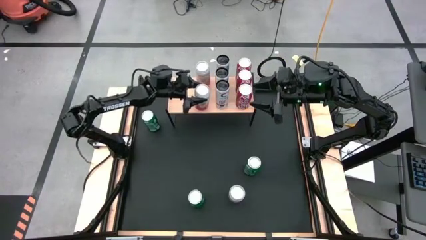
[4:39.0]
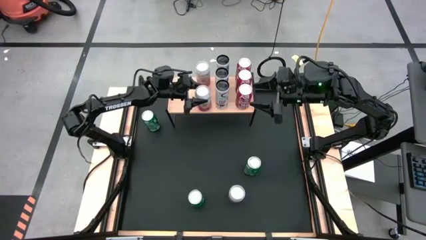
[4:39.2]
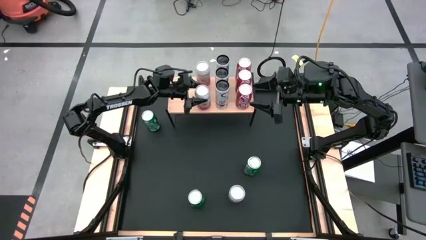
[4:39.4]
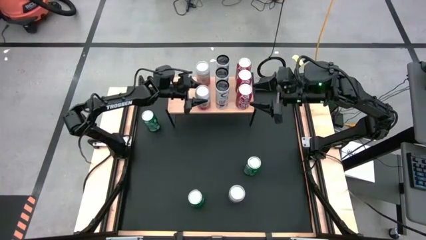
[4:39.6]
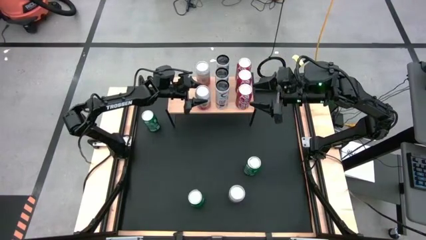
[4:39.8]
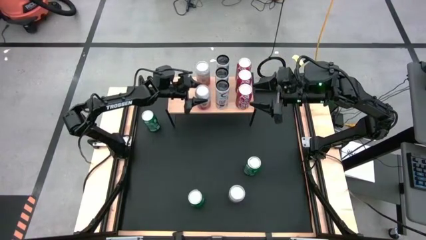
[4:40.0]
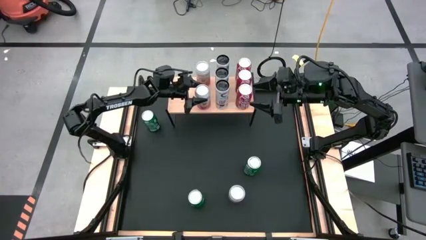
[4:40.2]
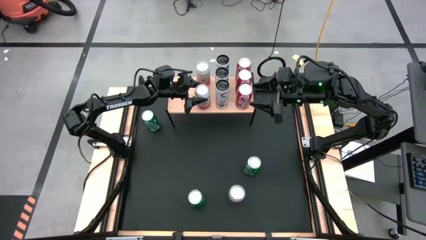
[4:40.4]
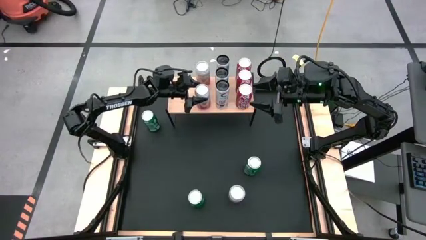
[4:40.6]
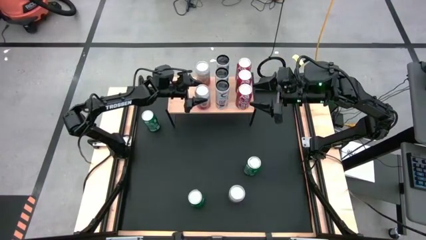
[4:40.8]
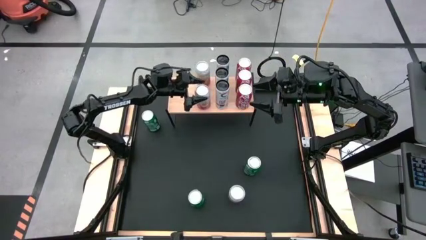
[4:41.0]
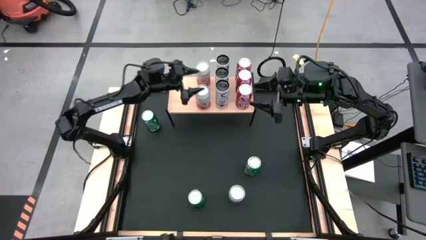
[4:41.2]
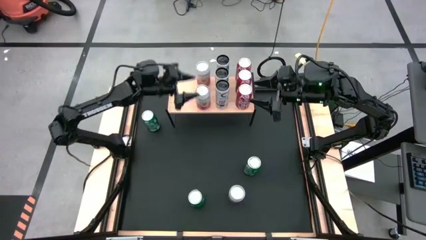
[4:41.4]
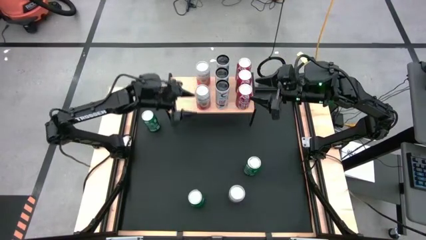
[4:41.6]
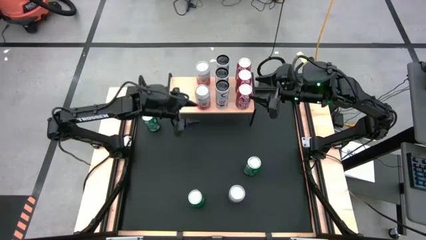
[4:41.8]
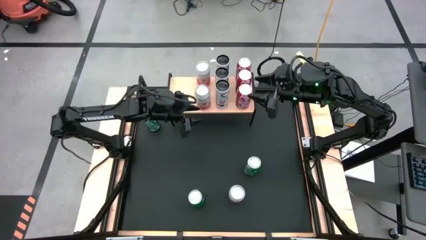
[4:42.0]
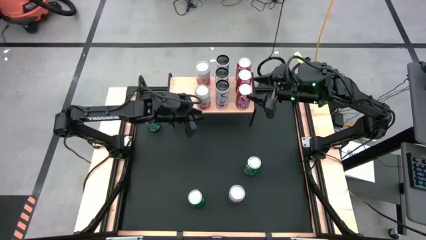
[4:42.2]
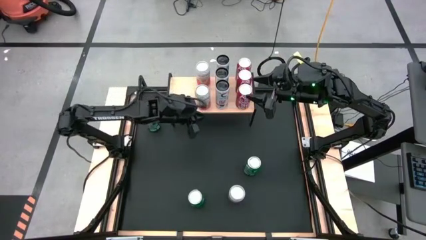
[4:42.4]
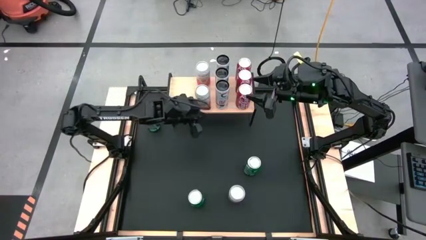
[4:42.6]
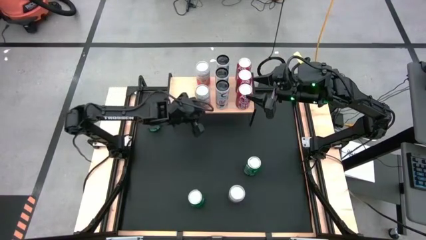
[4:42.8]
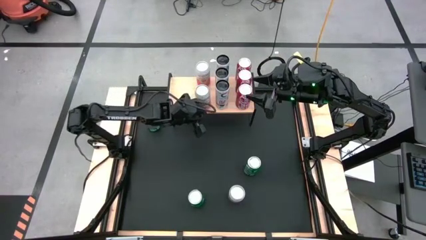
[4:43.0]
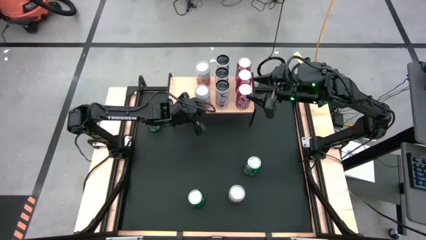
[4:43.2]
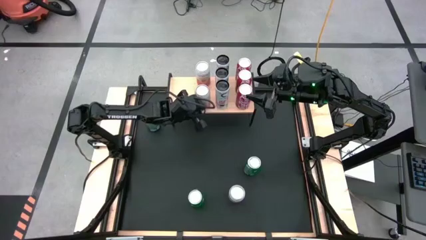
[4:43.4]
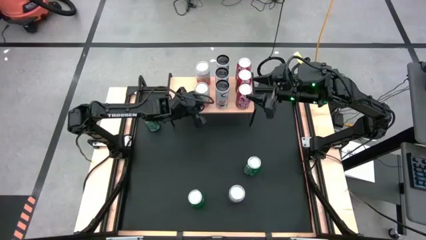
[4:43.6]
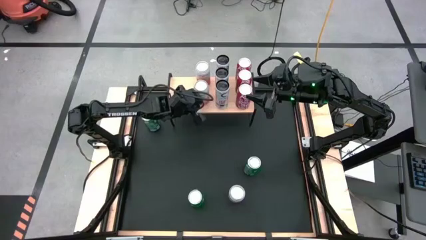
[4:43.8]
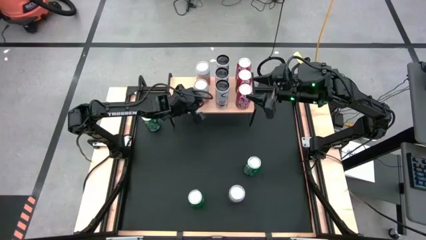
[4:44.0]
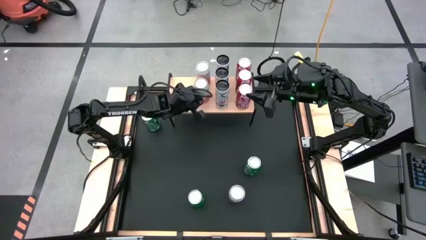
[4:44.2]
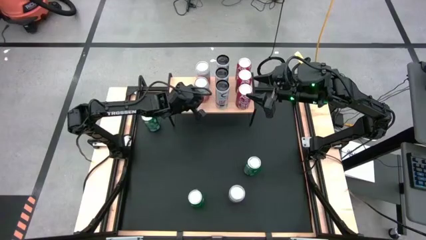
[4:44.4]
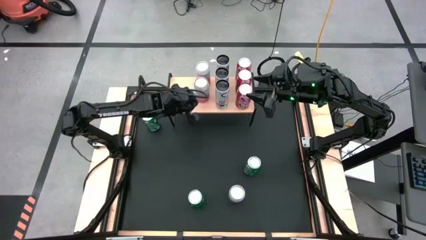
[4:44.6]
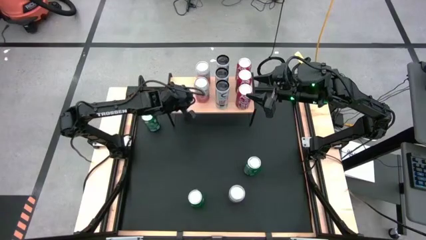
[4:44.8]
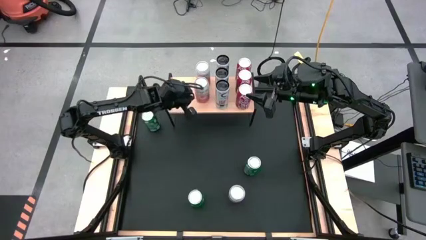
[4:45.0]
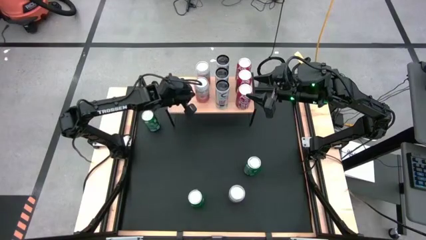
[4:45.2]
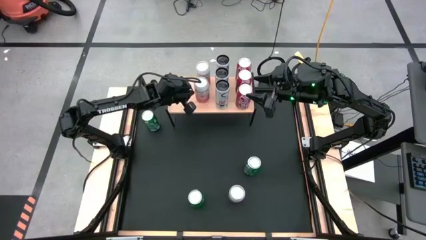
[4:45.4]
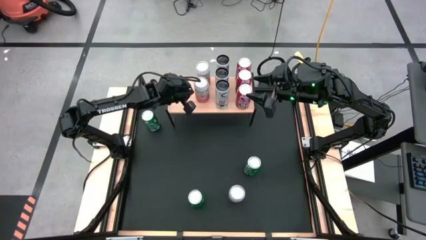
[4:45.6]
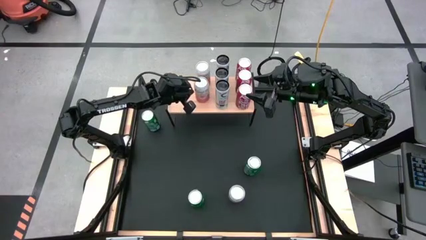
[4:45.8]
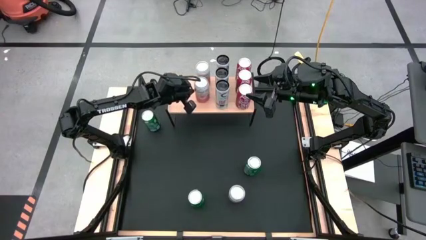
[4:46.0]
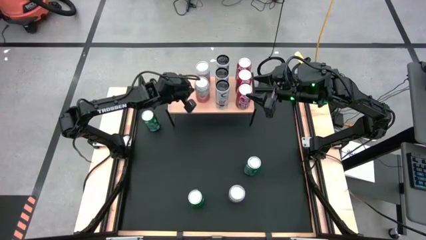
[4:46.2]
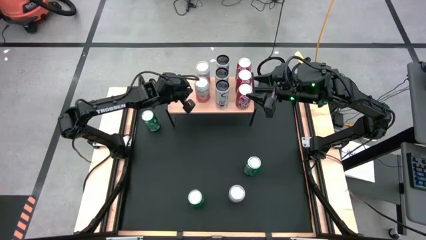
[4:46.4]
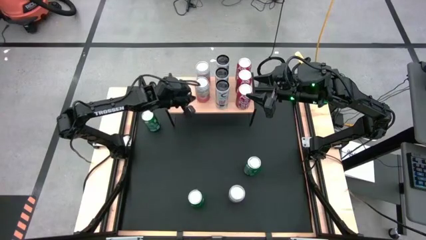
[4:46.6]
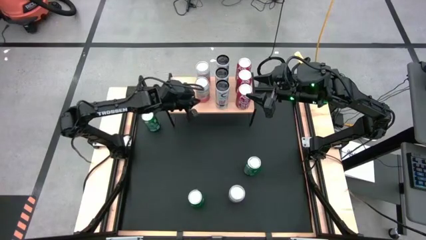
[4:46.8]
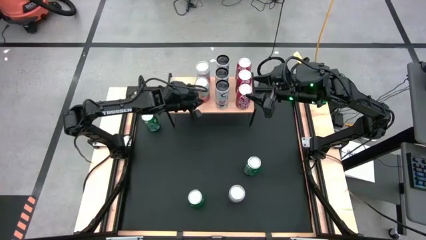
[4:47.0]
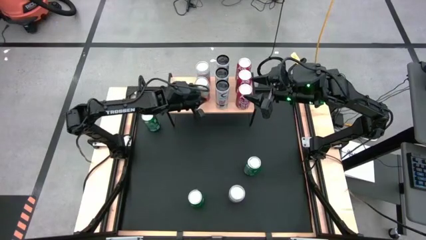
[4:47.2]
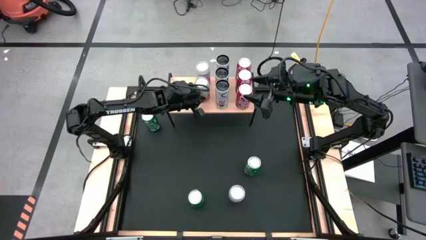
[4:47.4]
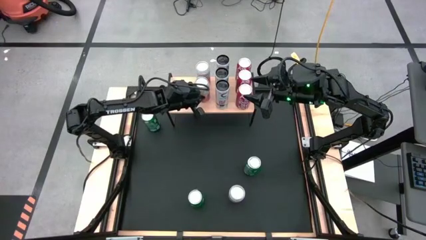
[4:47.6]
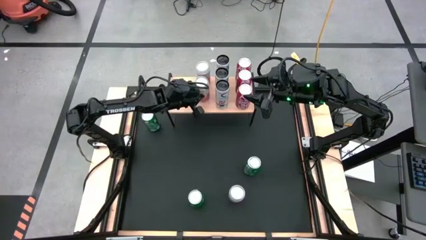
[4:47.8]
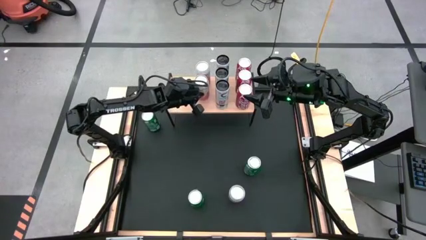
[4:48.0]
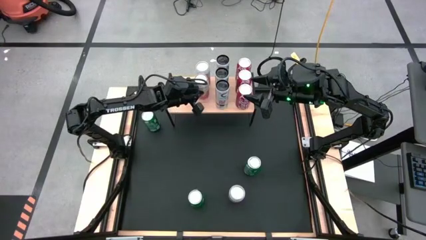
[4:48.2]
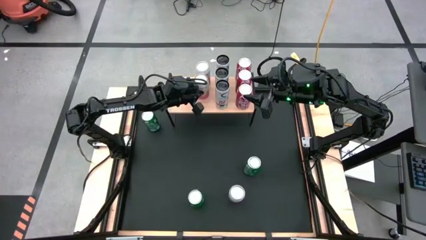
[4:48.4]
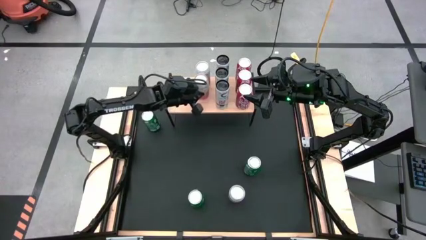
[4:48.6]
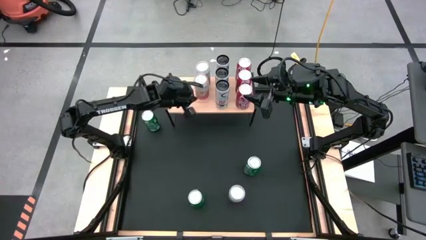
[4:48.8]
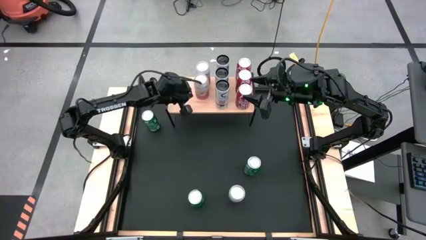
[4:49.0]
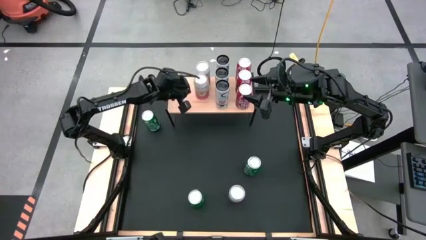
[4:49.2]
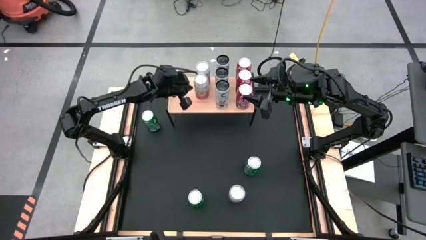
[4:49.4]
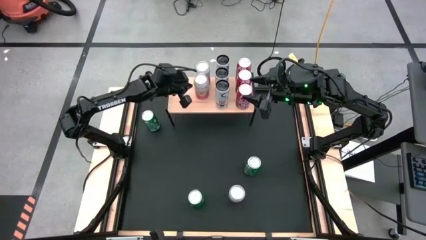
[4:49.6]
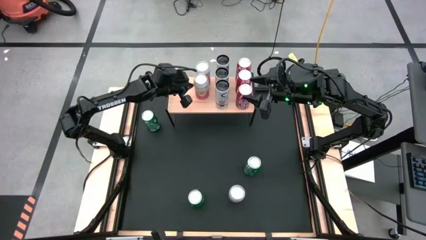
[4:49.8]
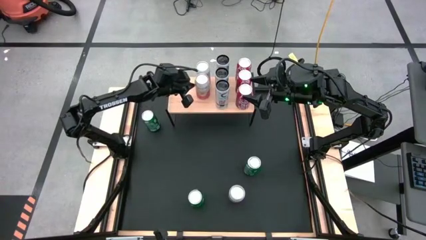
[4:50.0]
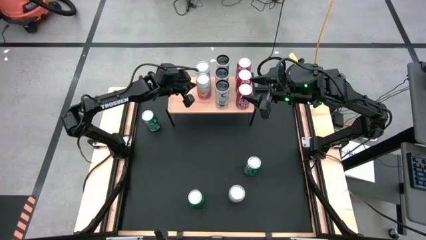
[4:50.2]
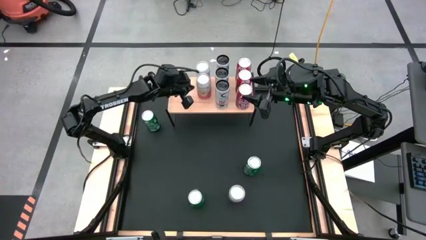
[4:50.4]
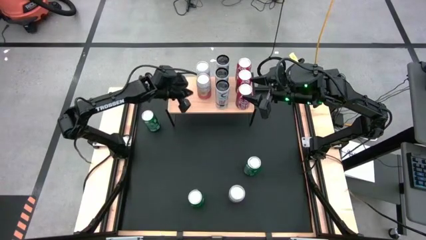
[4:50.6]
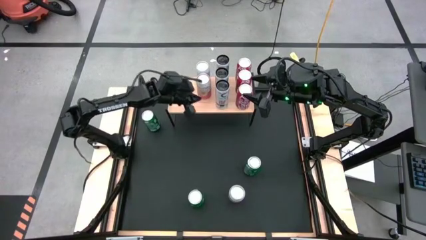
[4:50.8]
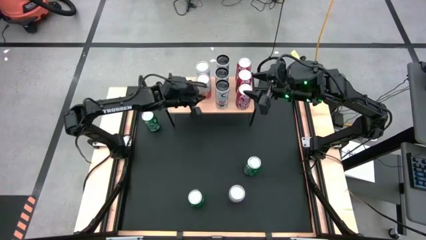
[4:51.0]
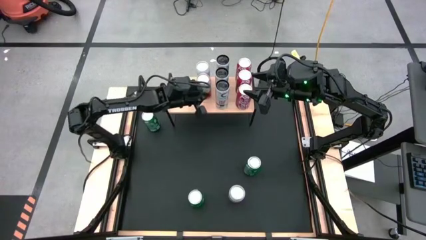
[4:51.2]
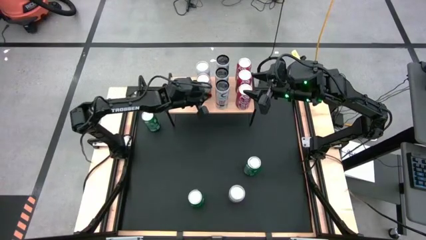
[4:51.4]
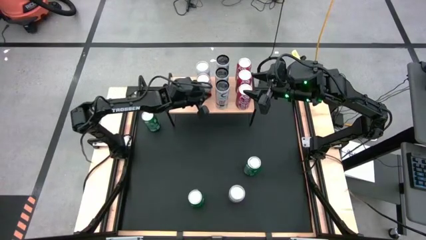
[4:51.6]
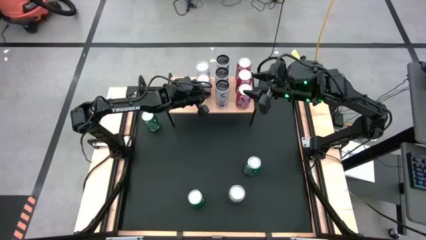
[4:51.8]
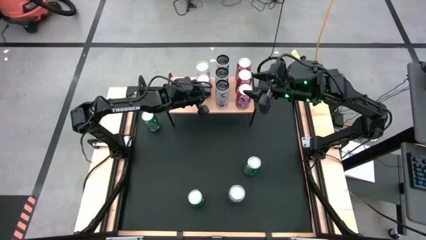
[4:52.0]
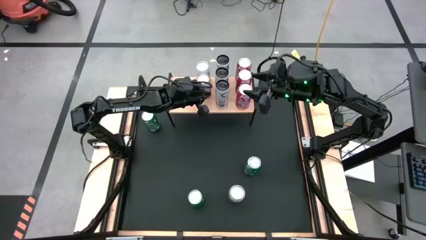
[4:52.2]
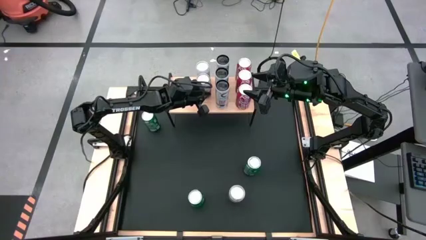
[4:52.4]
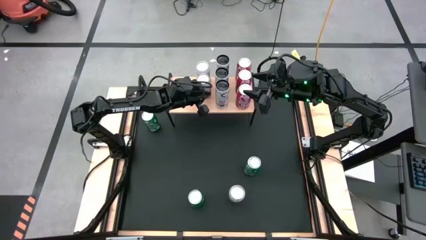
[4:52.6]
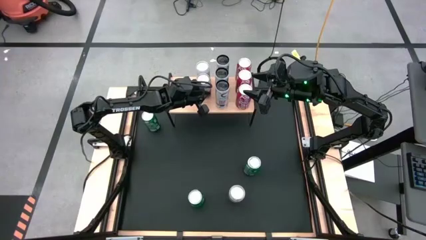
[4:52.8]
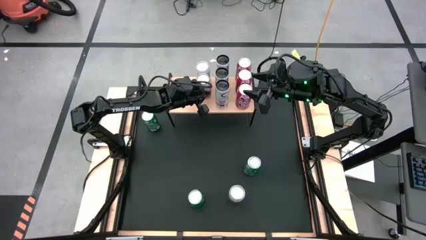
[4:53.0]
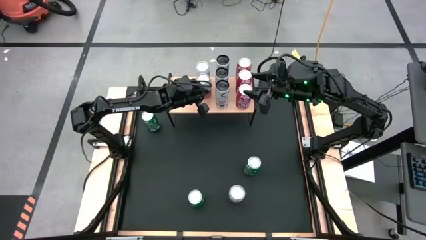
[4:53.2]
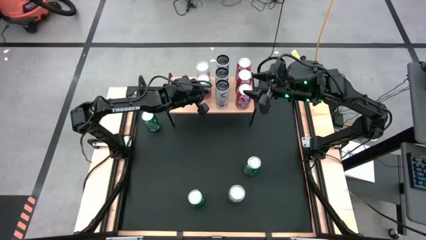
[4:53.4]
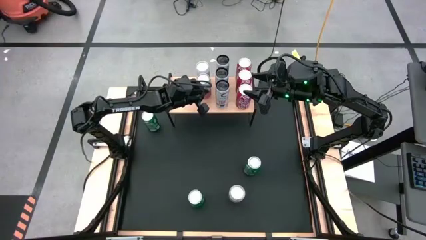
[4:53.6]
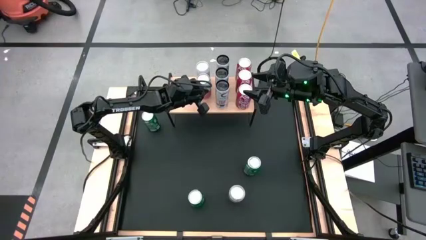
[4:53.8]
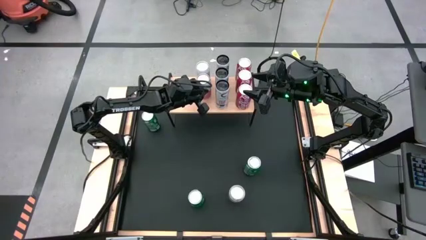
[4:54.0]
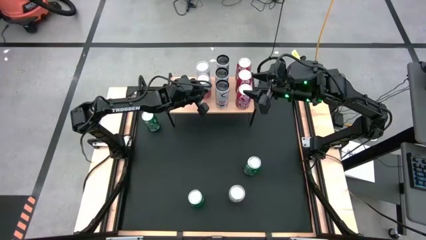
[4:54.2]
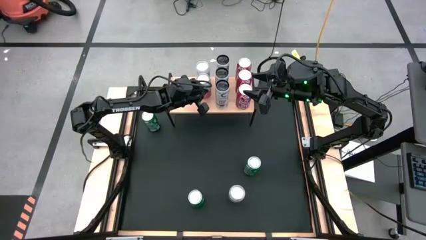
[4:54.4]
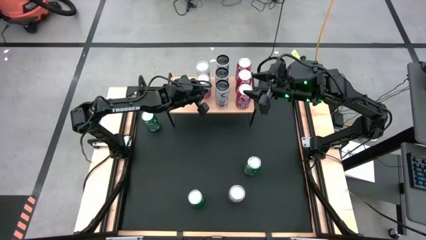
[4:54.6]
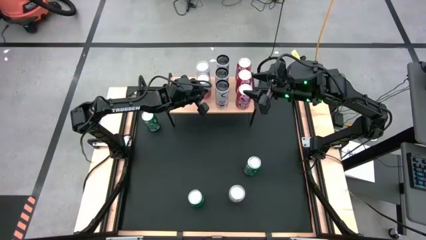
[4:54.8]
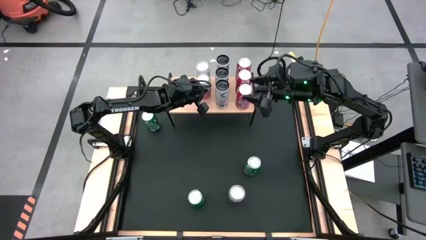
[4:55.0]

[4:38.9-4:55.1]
Task: Place canned beverage on shelf
Put the top pink white soda can aligned with the other pink white soda can on the shelf
